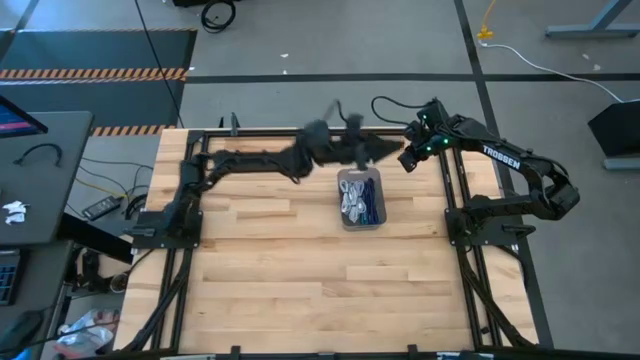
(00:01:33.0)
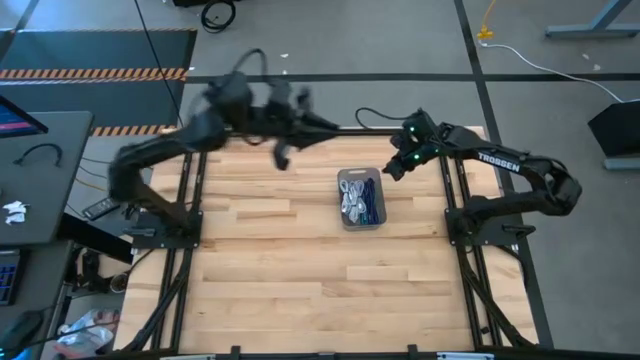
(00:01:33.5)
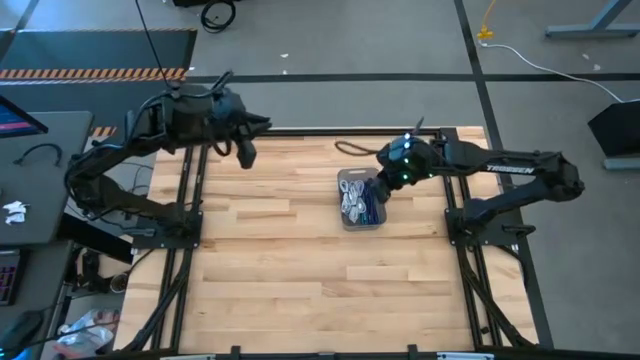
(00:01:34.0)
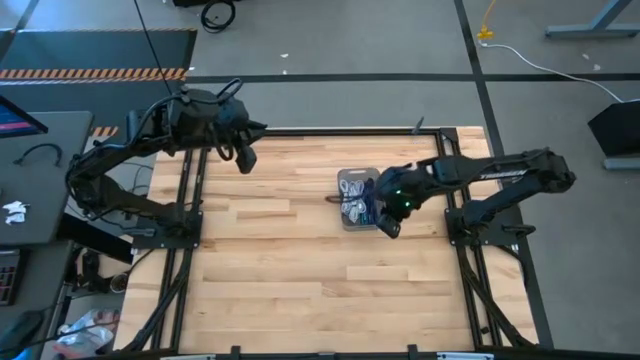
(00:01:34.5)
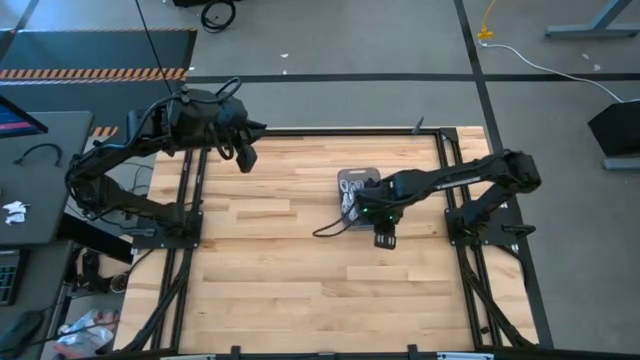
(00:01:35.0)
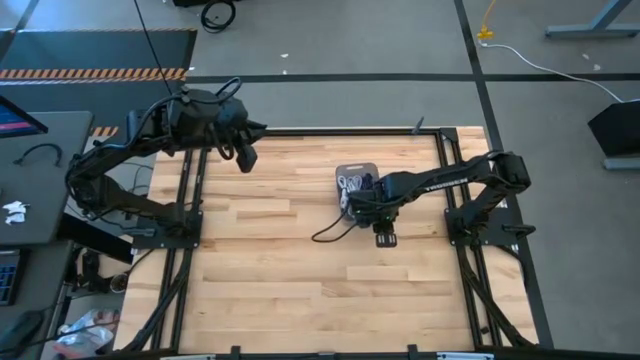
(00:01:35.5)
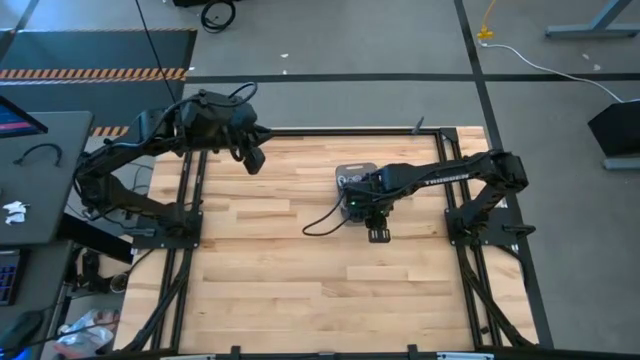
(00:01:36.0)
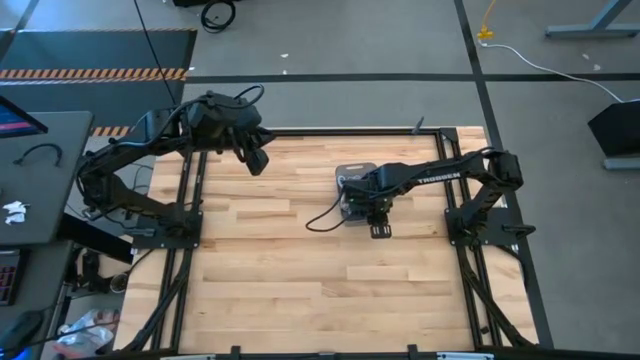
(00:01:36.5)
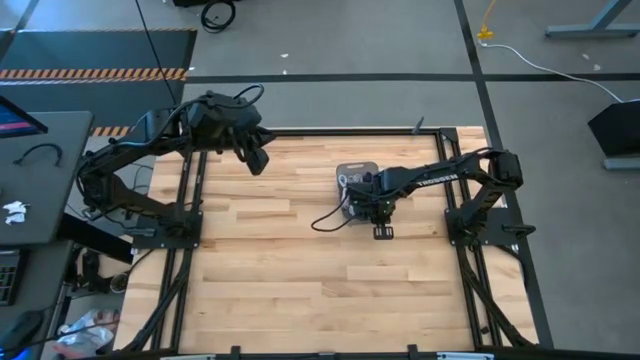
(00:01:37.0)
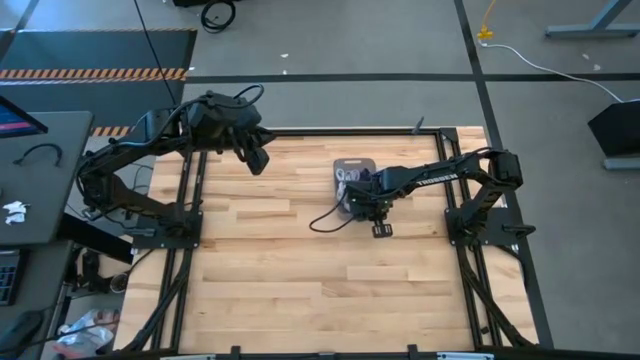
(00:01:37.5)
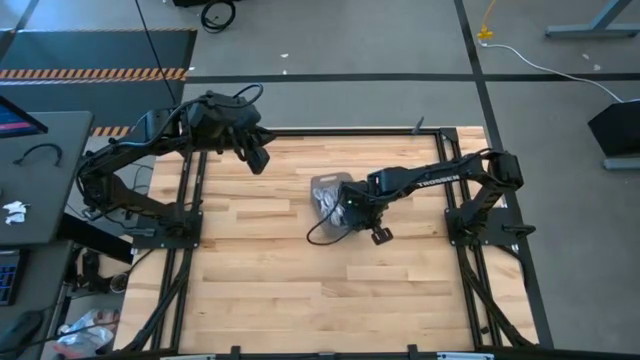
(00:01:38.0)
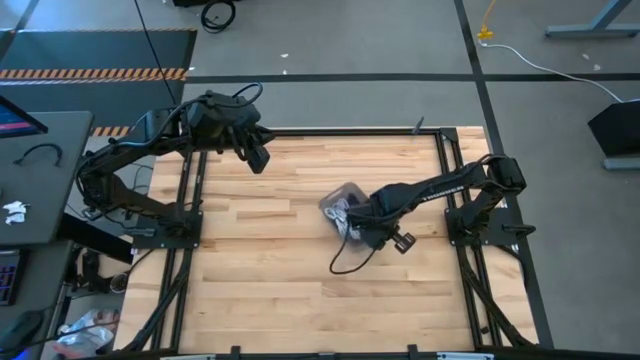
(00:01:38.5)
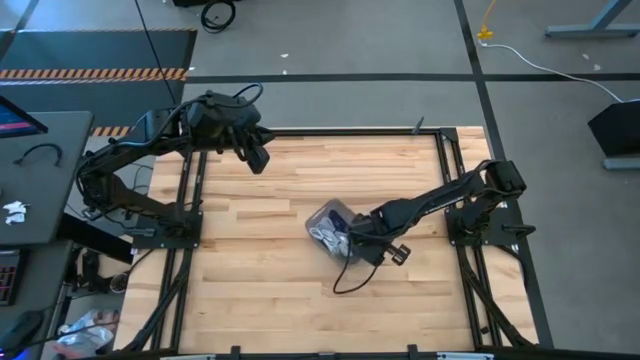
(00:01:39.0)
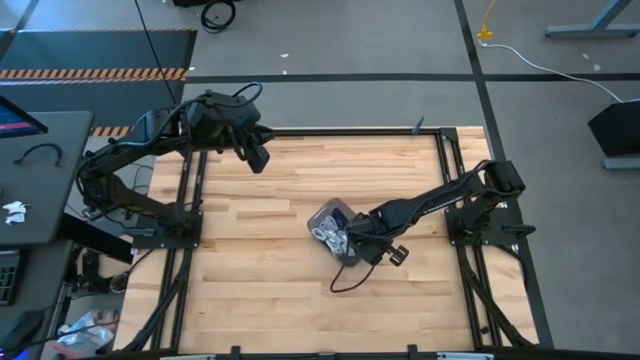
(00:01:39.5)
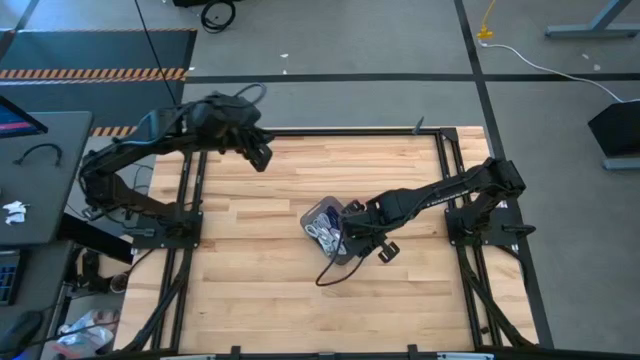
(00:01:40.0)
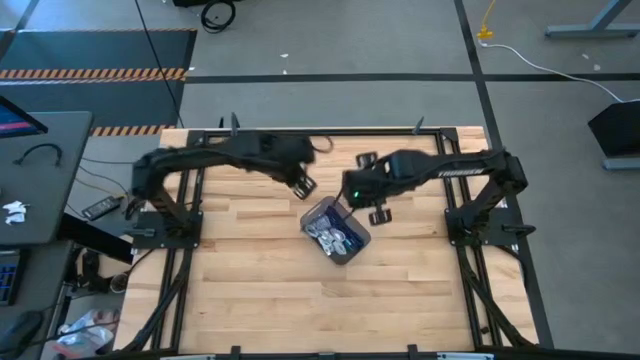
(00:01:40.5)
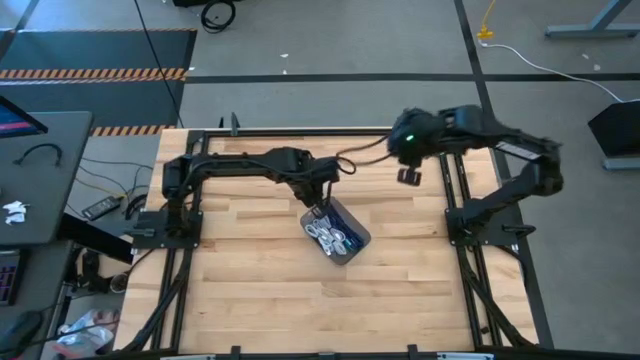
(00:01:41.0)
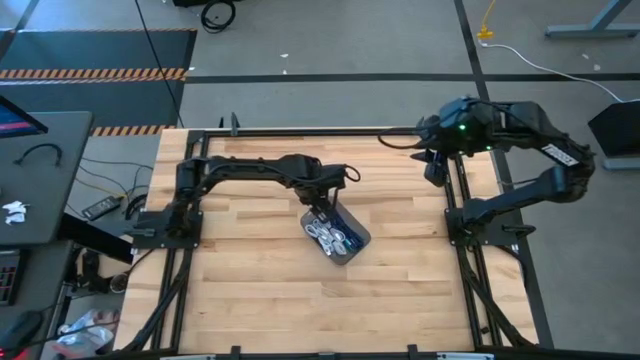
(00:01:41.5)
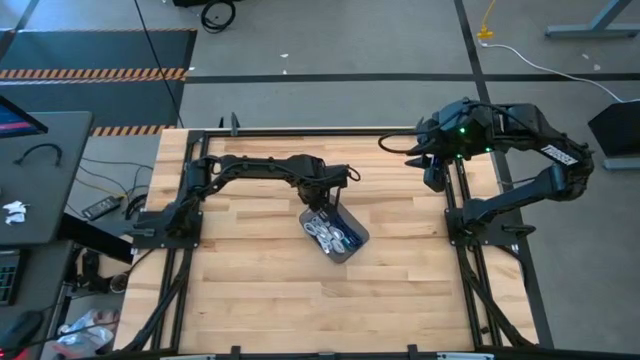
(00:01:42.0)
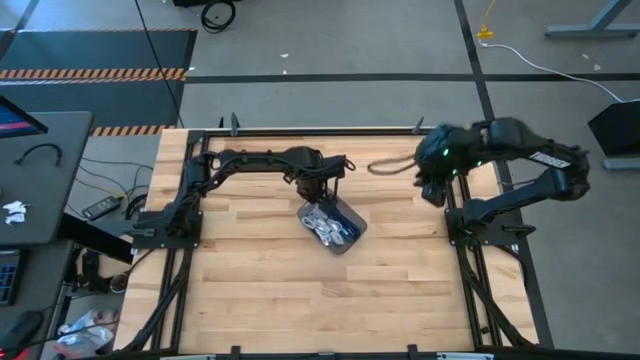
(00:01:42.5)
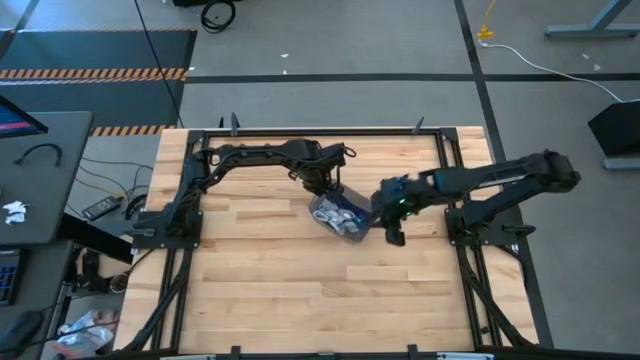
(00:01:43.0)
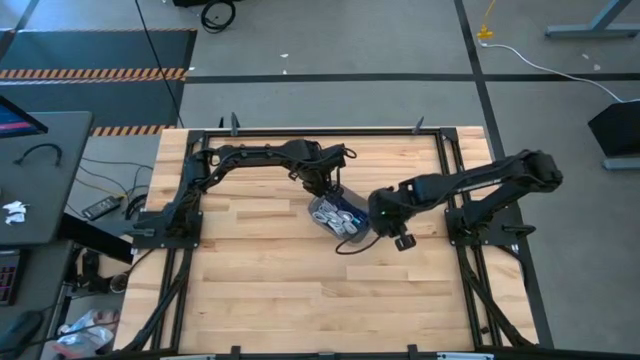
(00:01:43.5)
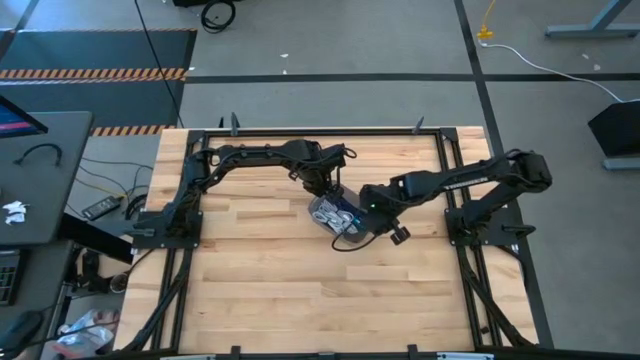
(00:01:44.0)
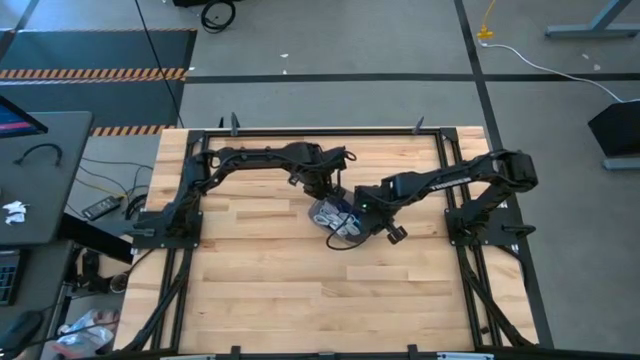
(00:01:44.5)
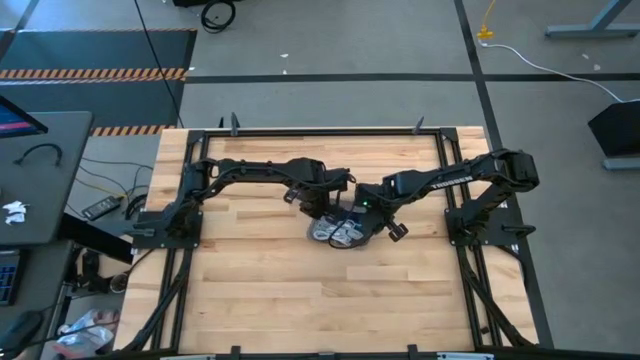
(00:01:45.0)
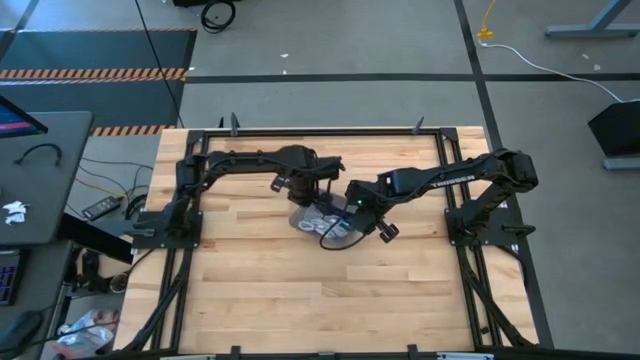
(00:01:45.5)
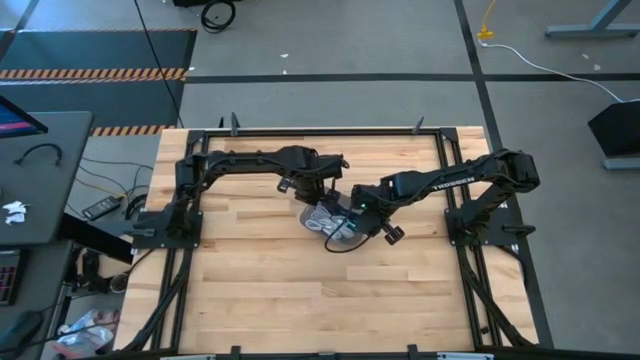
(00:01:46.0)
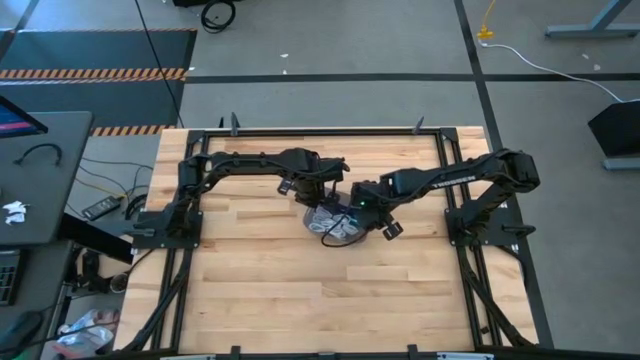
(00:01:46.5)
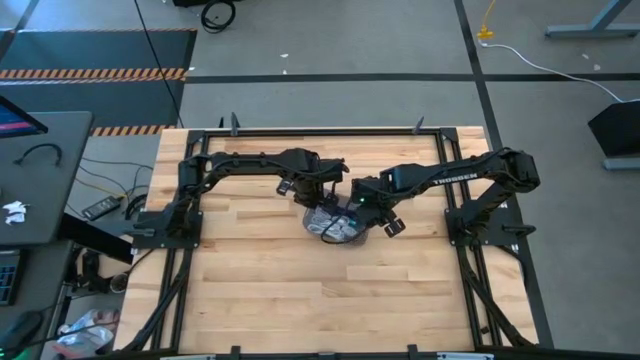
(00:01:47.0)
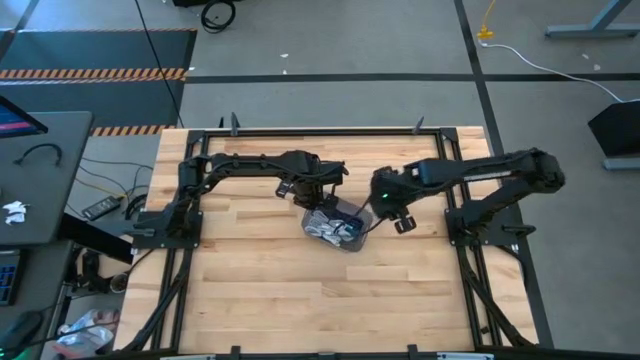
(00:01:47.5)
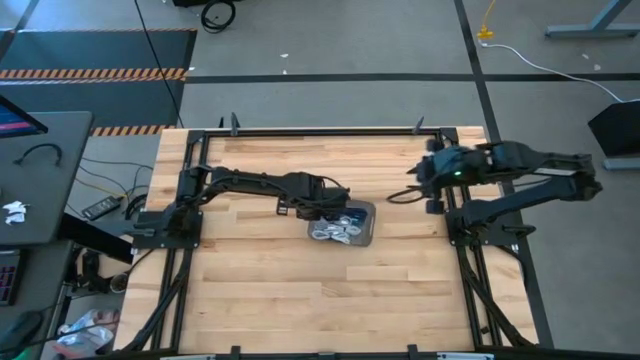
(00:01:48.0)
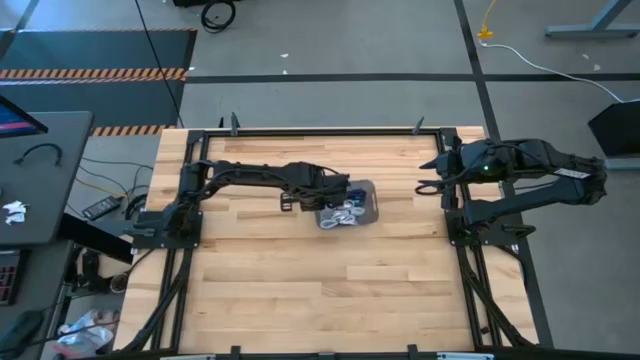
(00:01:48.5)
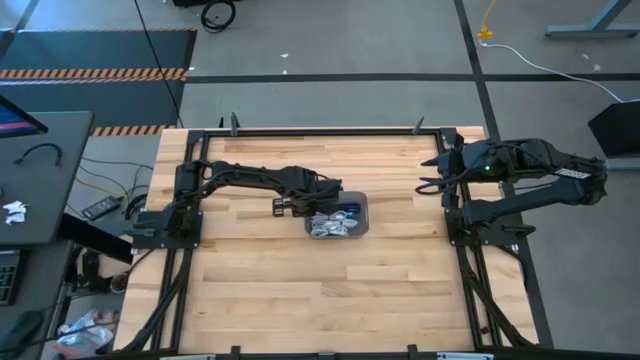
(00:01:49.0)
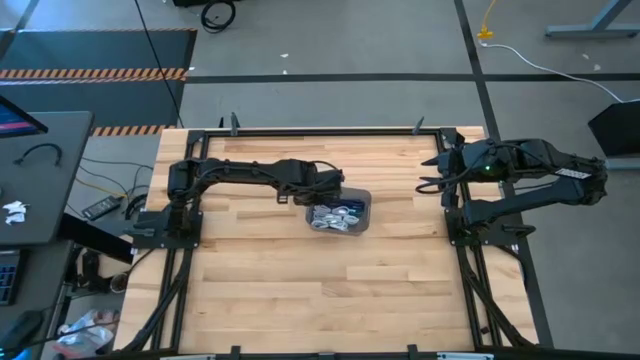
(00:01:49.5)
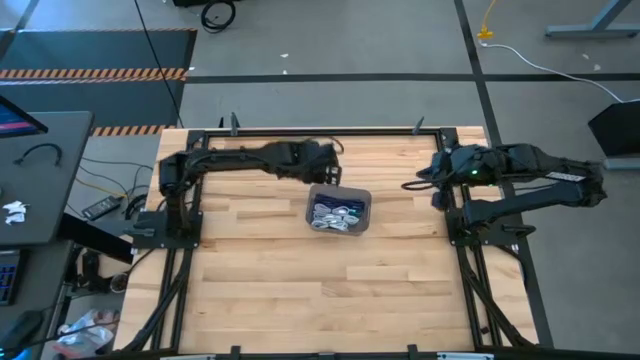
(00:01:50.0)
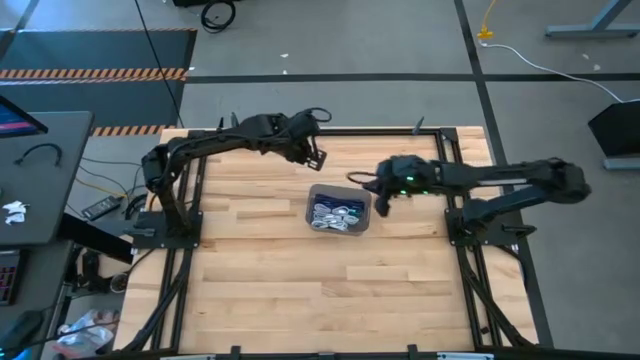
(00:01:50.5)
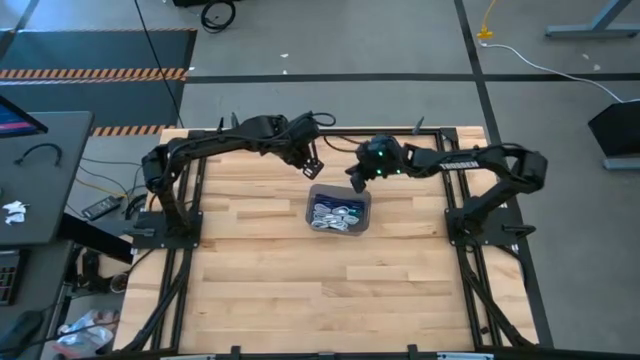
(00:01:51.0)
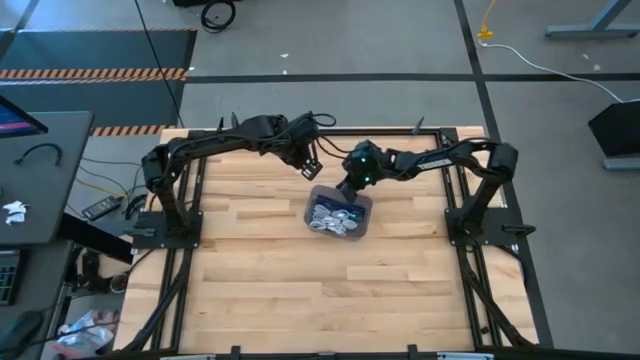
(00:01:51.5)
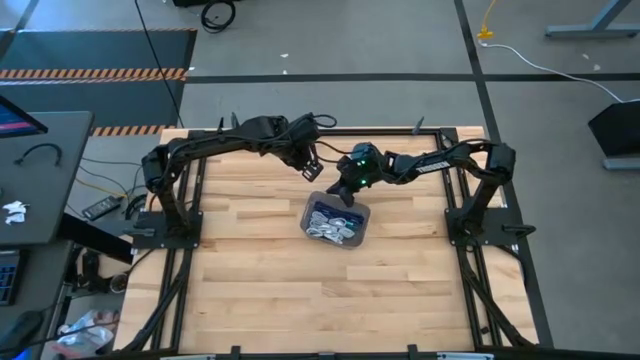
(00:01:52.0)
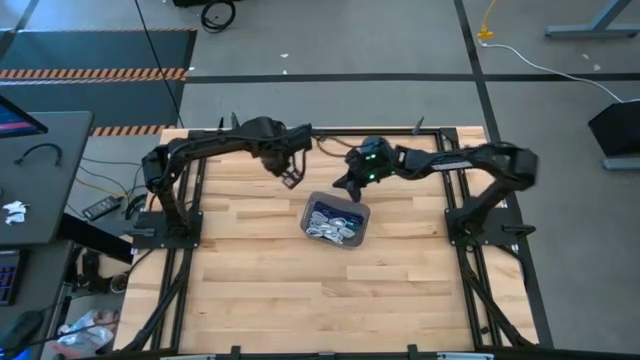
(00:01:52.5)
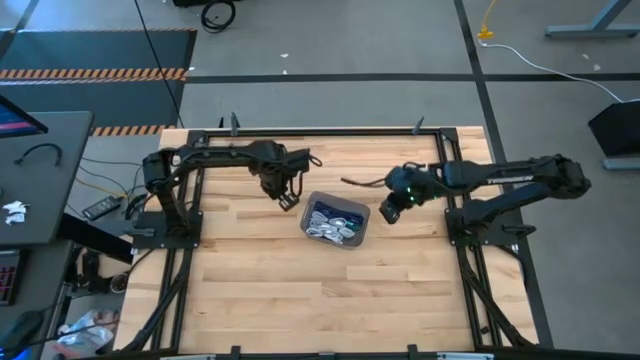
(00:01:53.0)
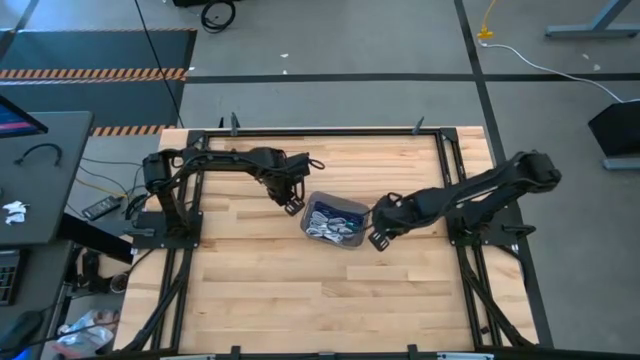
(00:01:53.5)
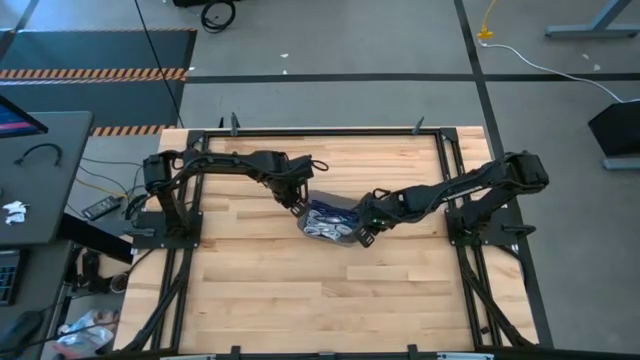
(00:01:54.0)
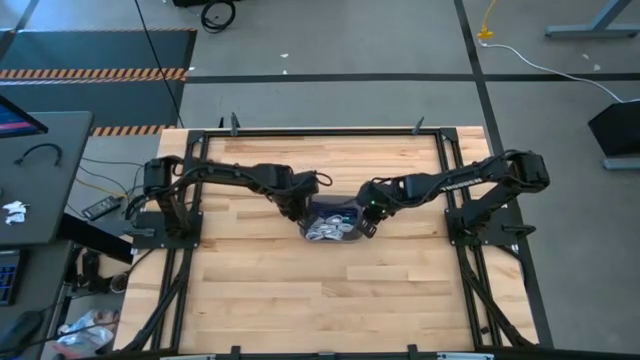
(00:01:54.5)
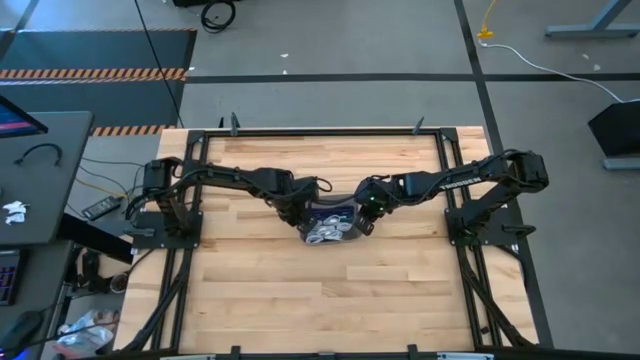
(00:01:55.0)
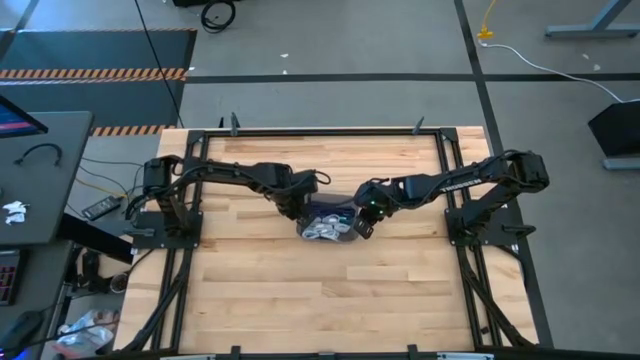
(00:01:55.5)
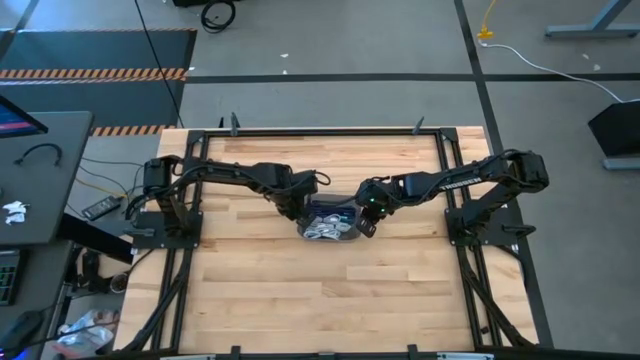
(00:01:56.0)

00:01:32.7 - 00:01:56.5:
Task: Pick and place USB-C Cables
Move the gray bin to the center of the table
